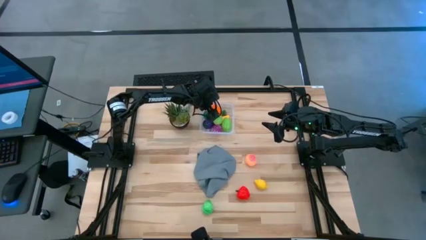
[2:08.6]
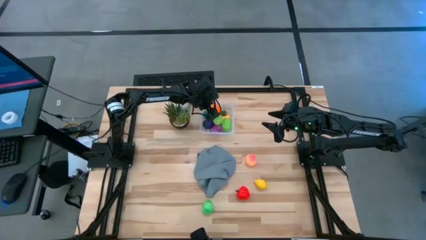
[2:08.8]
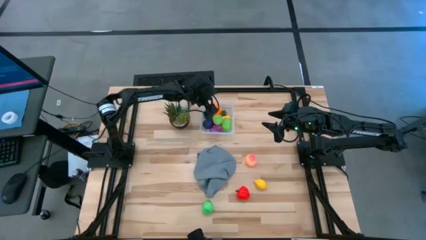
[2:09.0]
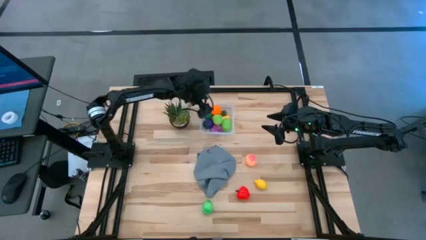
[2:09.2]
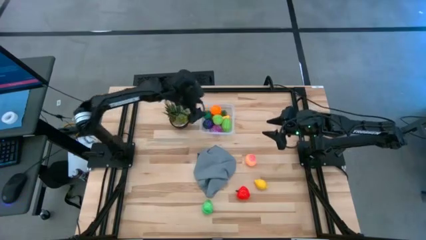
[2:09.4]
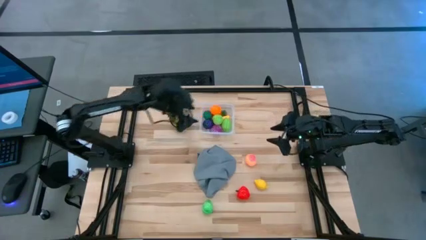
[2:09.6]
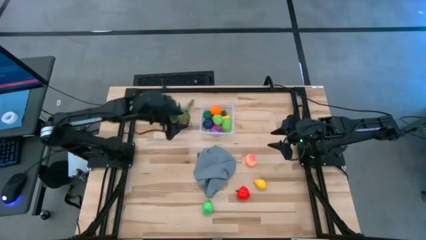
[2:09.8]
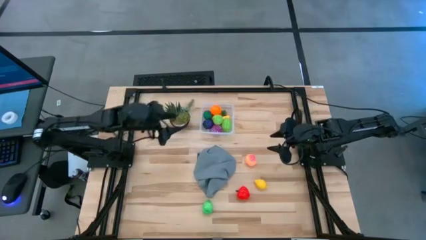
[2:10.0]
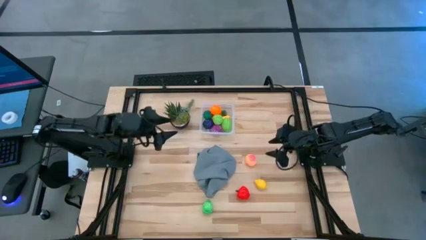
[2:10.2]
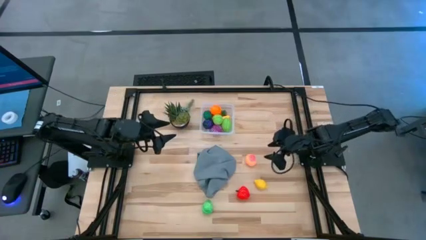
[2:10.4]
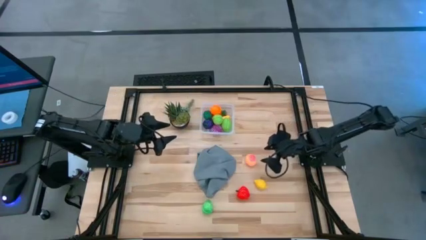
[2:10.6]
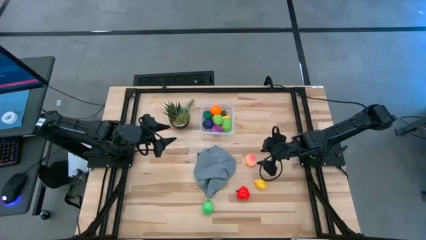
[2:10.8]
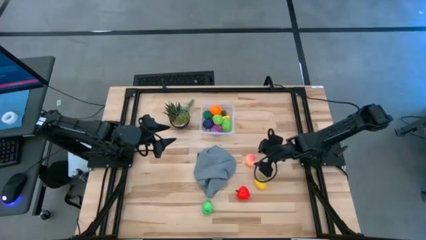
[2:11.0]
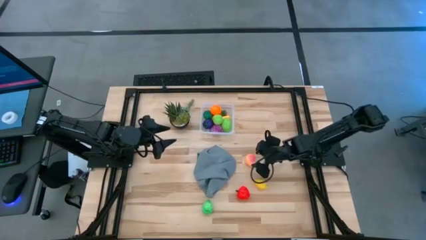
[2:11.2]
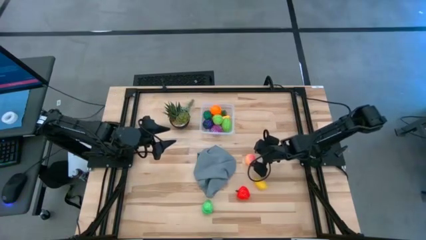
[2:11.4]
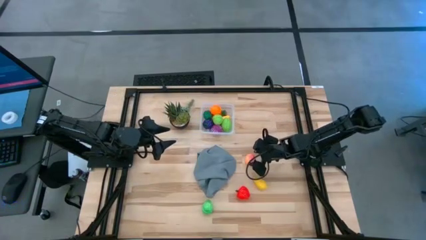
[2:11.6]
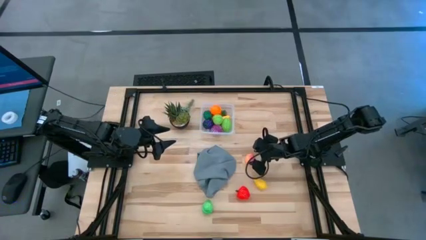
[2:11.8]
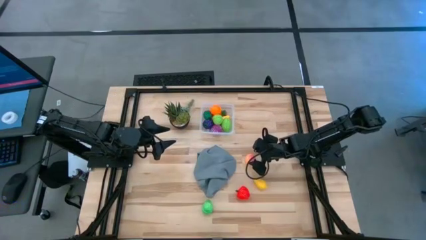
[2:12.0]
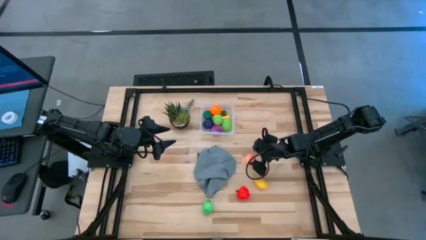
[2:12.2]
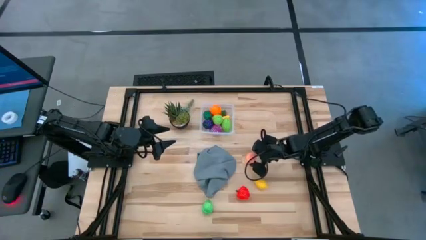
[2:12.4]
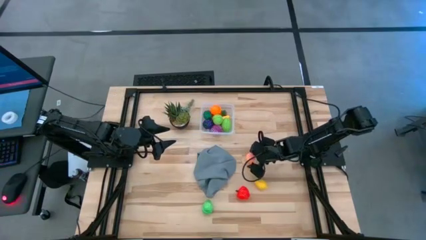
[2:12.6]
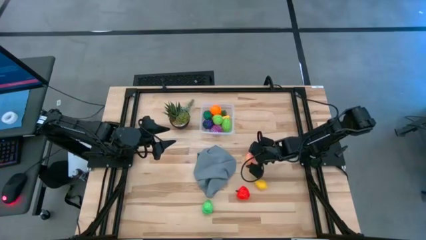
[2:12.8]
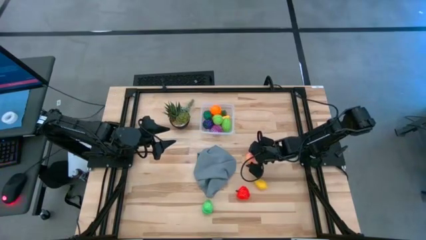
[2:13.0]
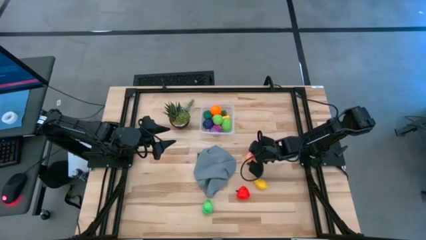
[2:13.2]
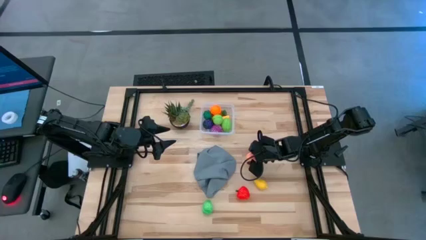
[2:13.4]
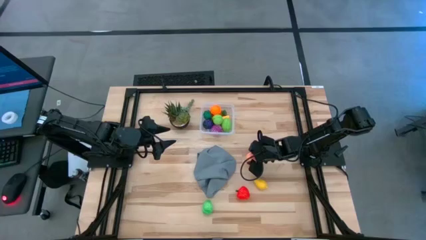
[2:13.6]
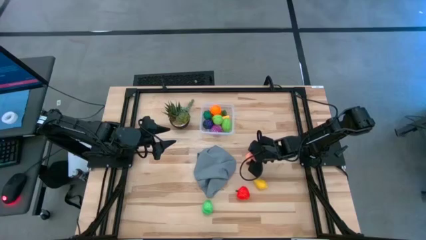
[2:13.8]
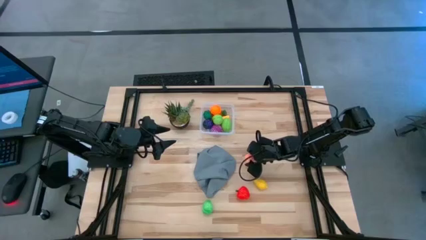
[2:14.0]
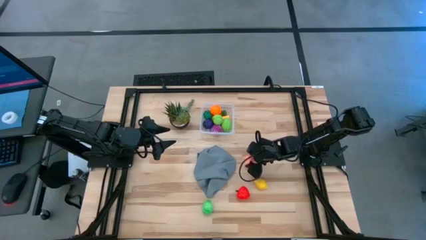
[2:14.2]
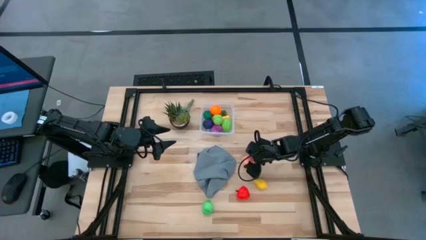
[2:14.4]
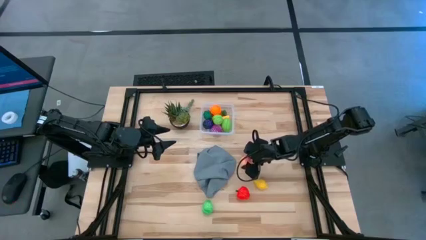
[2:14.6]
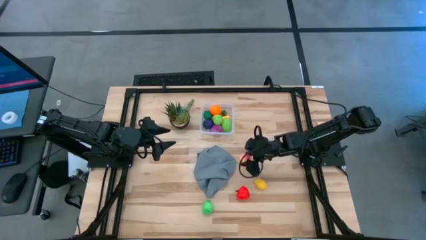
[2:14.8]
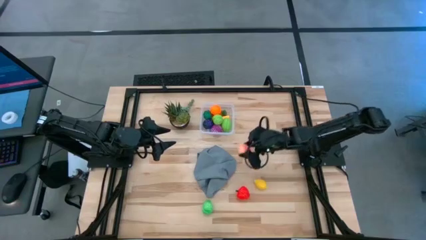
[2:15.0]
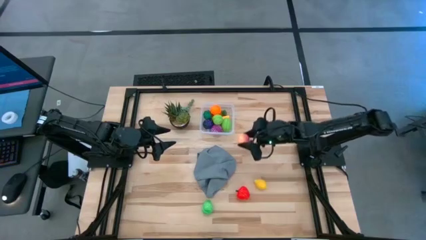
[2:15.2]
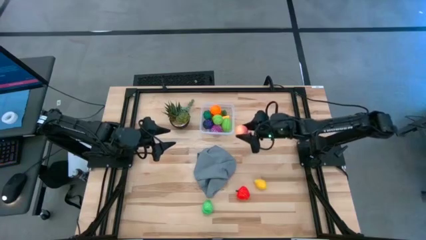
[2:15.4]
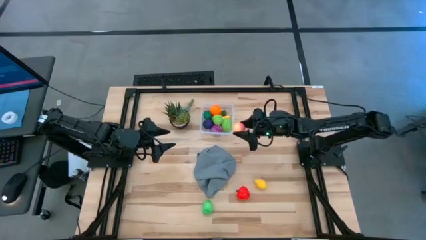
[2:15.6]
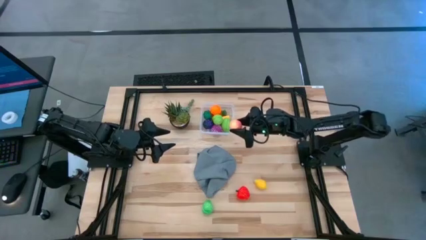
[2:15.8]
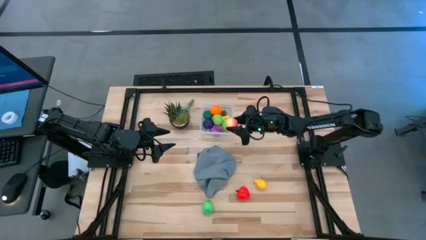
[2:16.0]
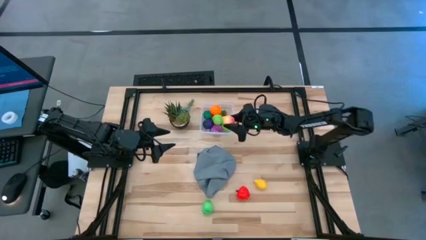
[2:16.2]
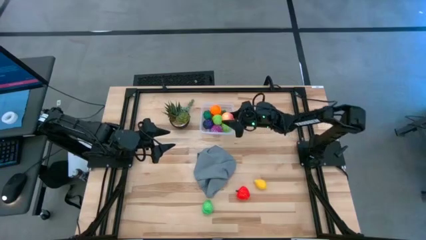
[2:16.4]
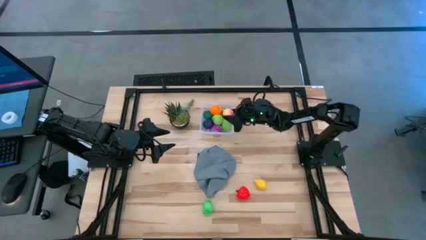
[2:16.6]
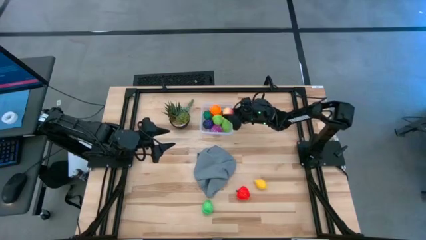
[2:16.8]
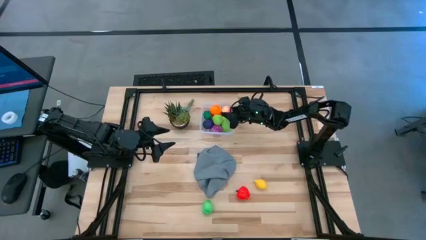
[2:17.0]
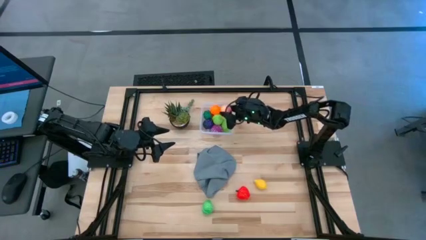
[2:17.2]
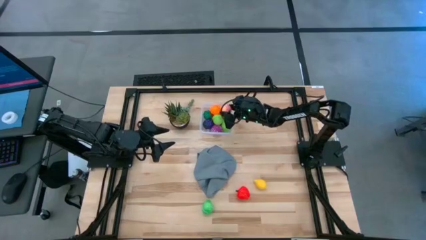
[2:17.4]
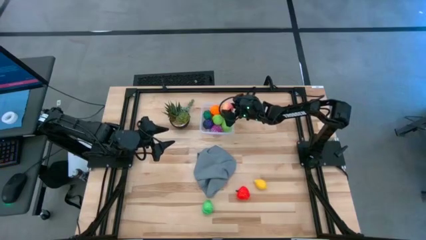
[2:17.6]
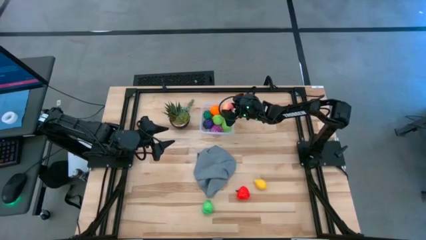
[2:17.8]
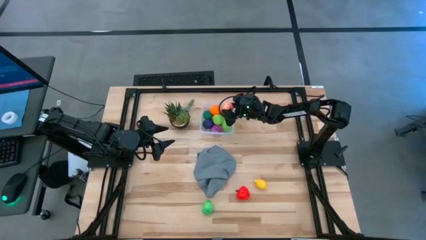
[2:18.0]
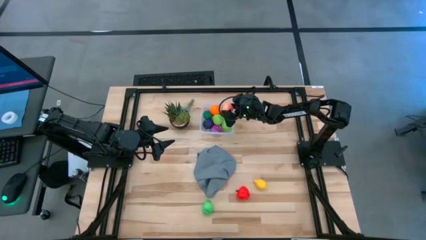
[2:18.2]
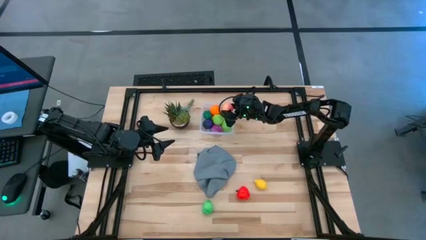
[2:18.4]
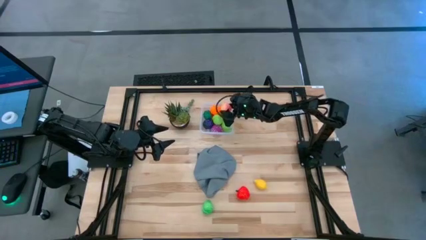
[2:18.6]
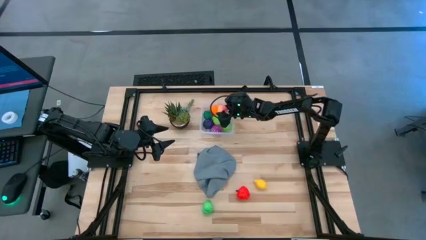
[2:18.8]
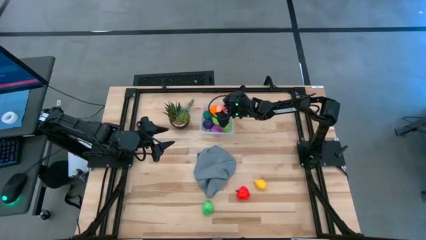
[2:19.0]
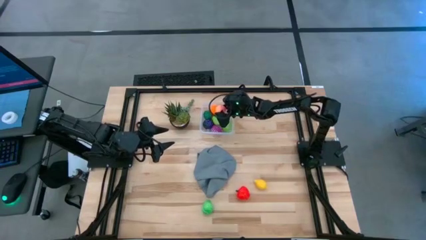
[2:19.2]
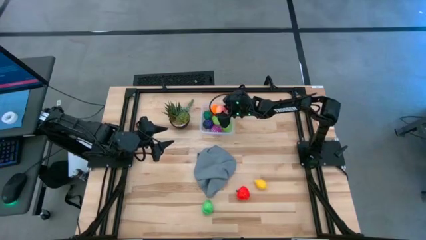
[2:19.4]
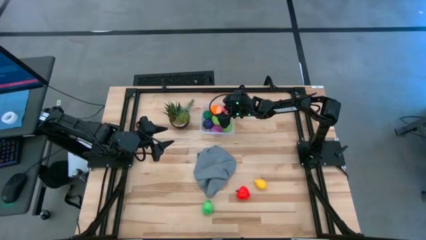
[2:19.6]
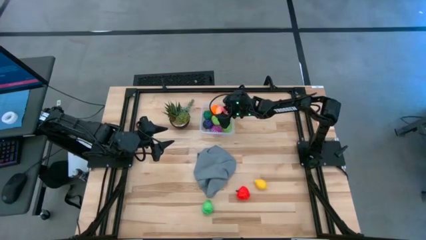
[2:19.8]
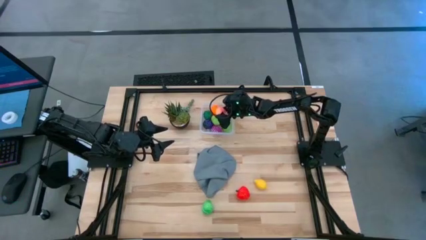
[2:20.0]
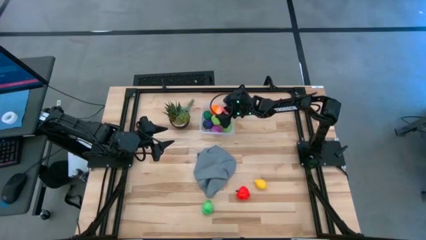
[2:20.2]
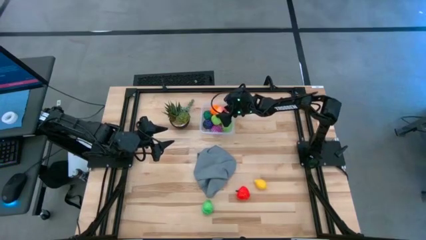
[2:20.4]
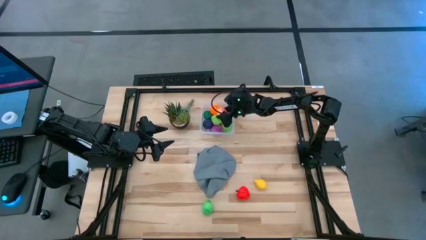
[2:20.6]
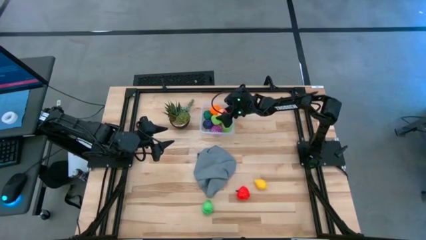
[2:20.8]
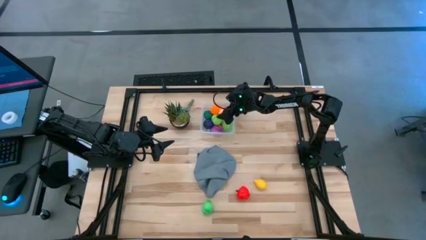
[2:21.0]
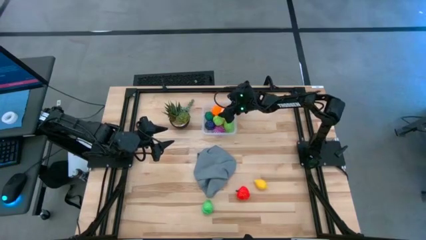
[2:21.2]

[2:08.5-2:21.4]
Task: Pick and placing Produce into tupperware
Put the pink peach into the transparent container

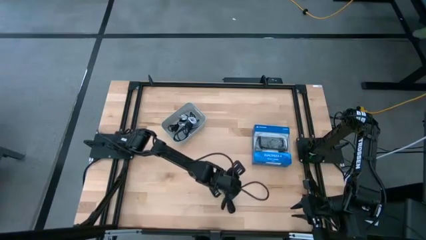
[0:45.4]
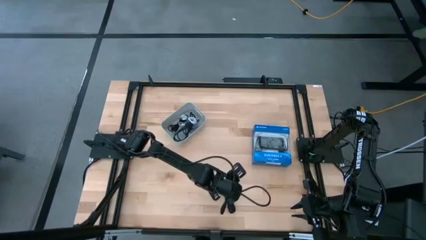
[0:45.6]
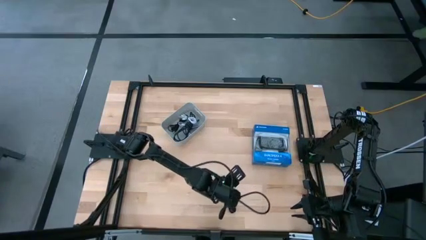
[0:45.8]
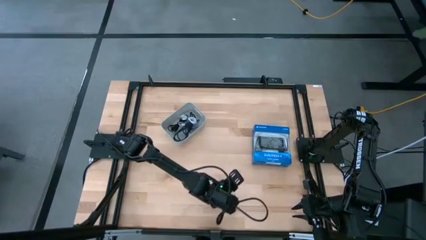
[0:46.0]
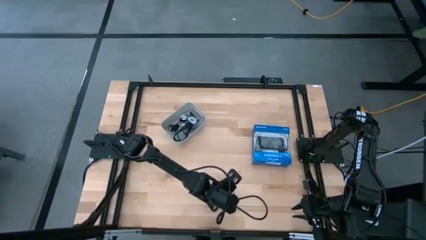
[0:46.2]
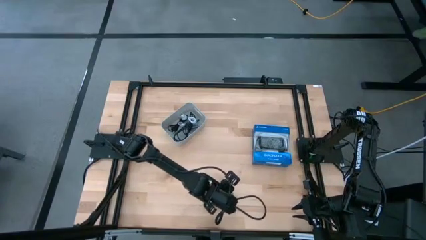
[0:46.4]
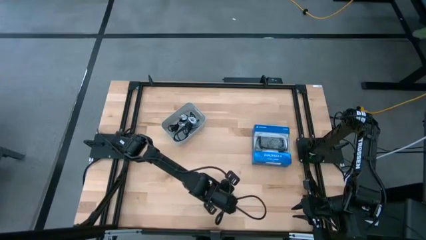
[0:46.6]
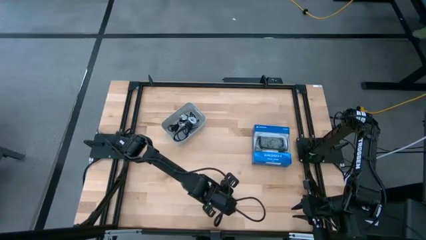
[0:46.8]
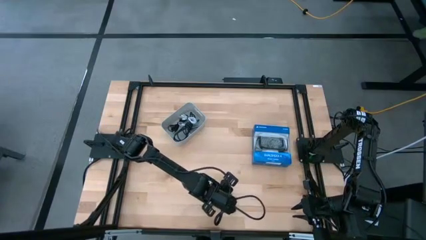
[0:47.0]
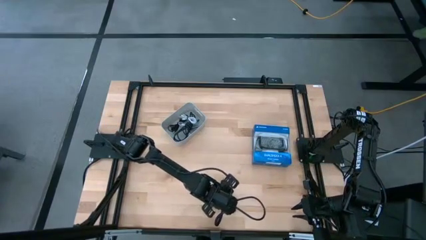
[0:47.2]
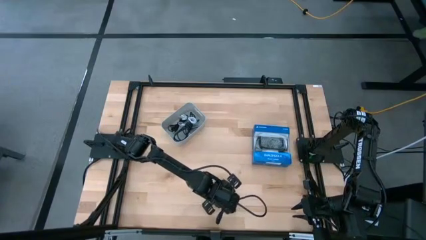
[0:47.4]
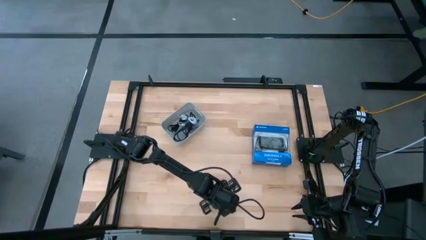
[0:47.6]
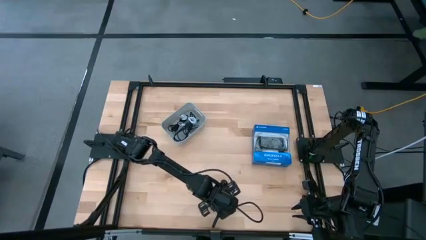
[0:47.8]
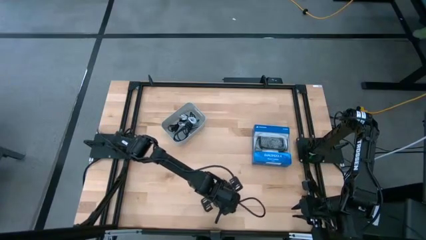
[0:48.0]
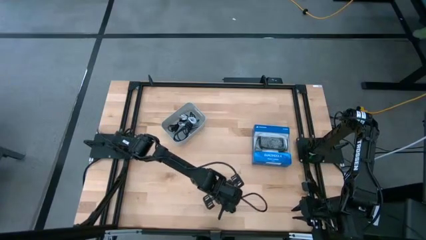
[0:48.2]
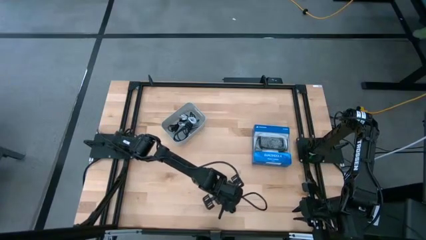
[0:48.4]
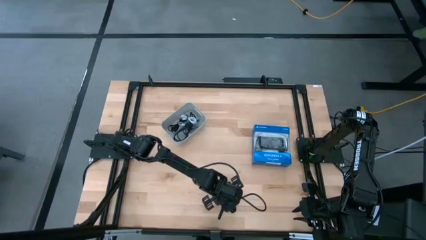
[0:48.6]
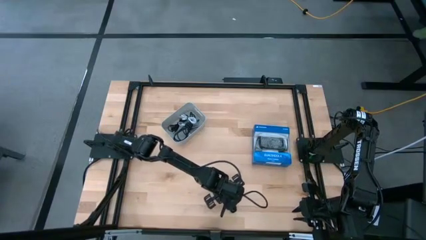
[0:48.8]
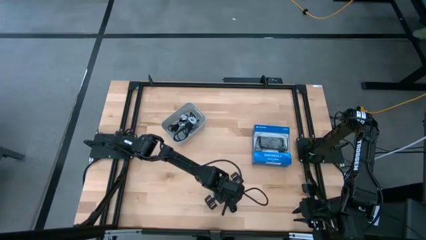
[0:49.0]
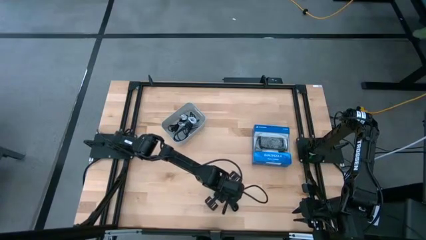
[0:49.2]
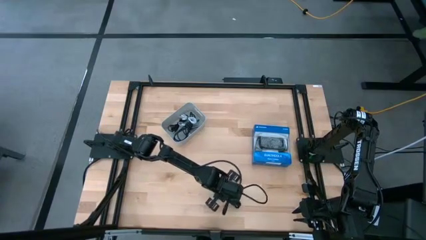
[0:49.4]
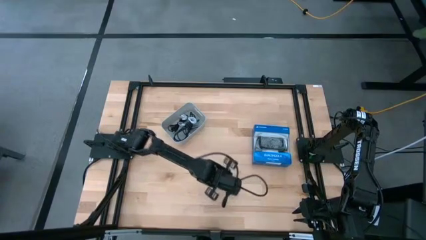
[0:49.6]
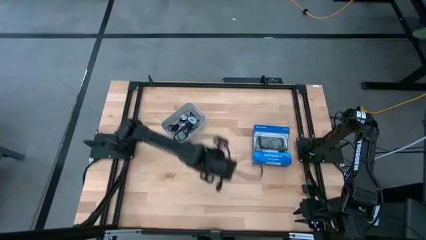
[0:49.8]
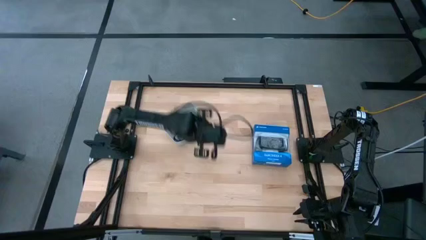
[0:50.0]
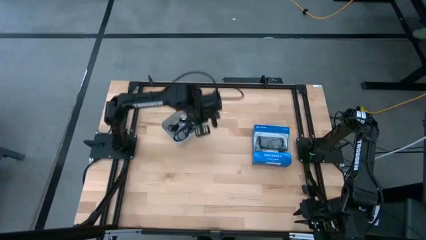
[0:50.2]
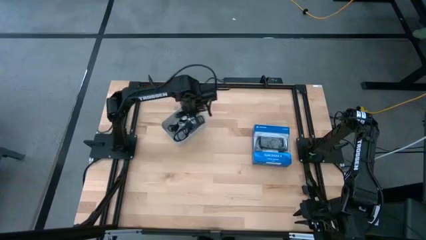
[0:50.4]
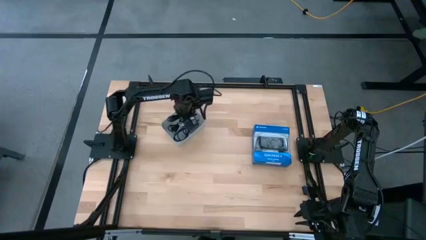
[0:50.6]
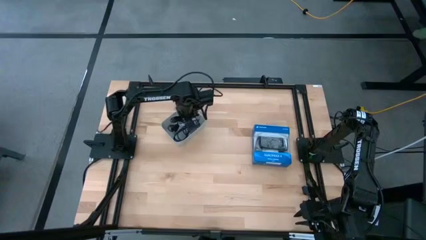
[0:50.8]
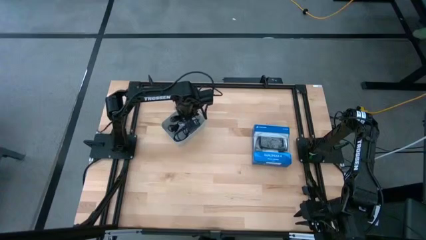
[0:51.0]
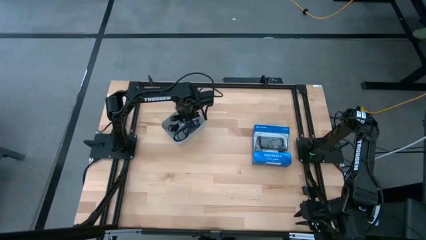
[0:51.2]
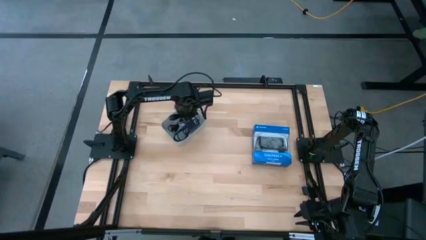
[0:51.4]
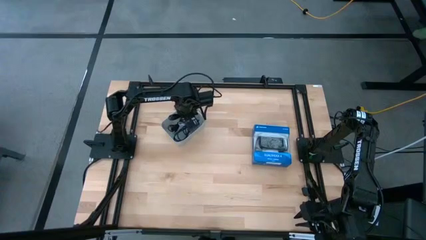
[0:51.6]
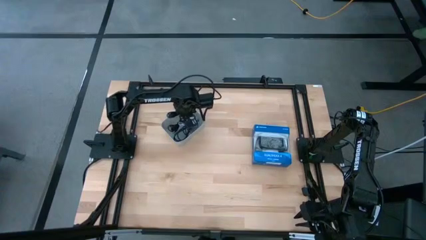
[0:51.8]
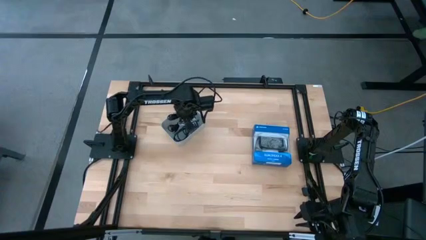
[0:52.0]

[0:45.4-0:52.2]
Task: Pick and place USB-C Cables
Put the black charger cable into the white bin
